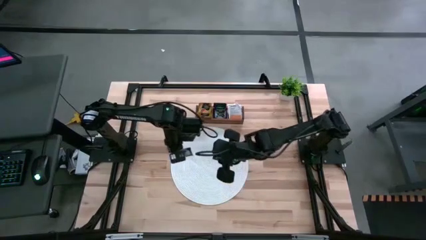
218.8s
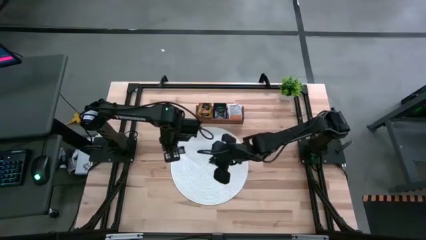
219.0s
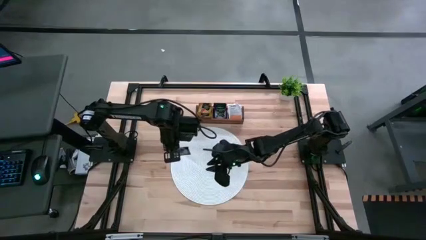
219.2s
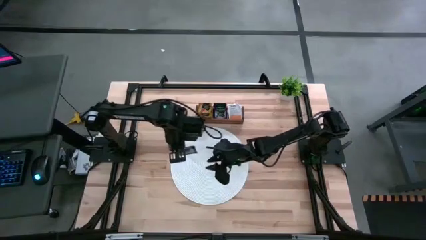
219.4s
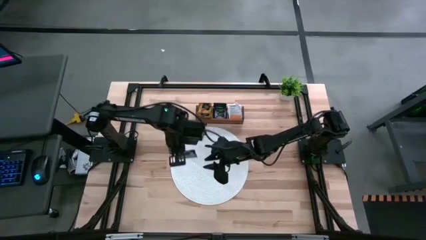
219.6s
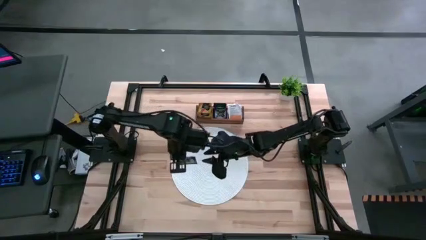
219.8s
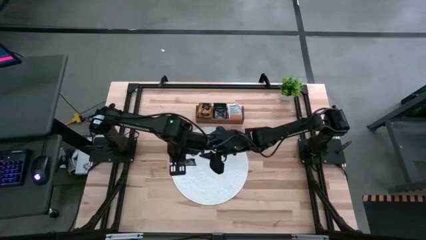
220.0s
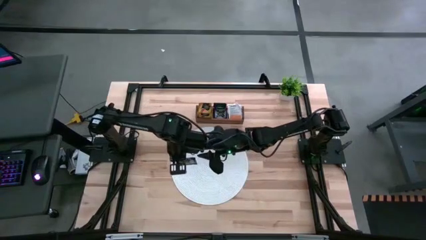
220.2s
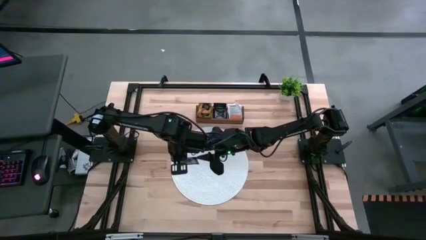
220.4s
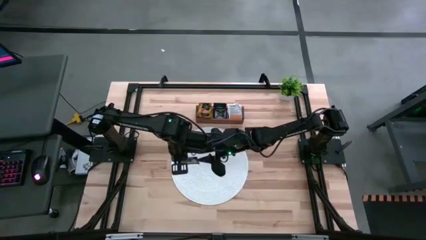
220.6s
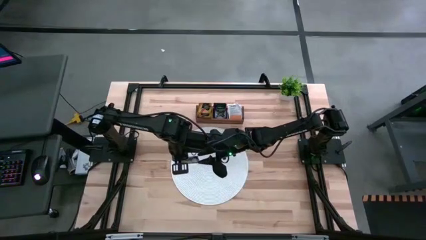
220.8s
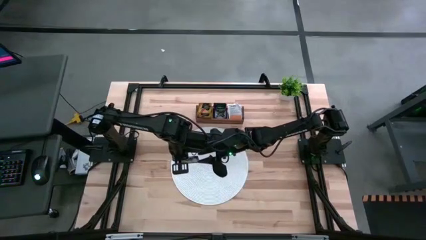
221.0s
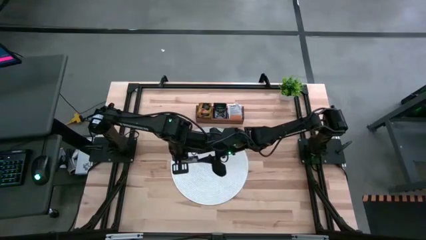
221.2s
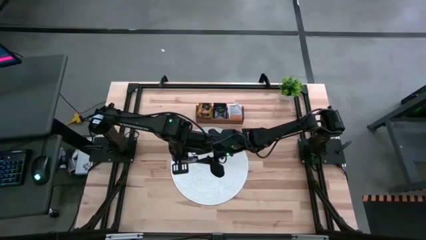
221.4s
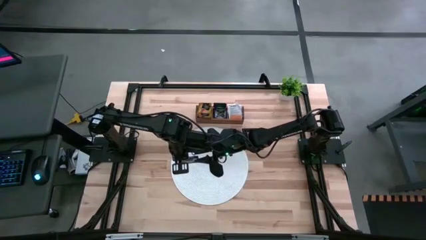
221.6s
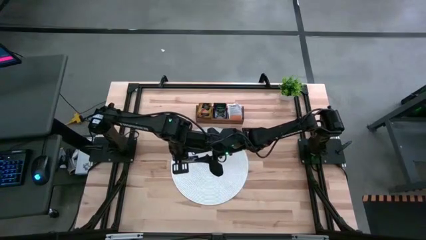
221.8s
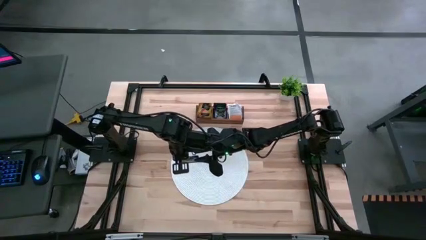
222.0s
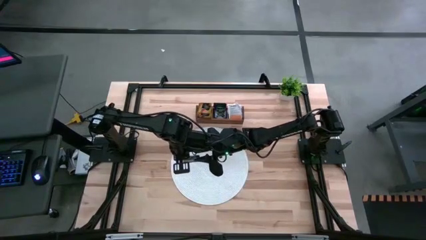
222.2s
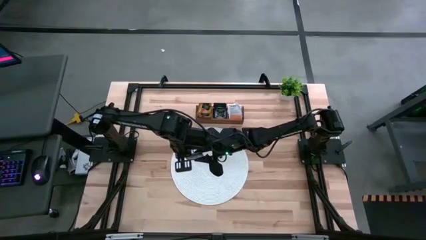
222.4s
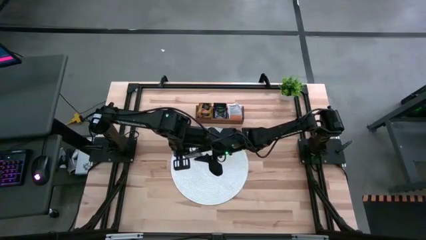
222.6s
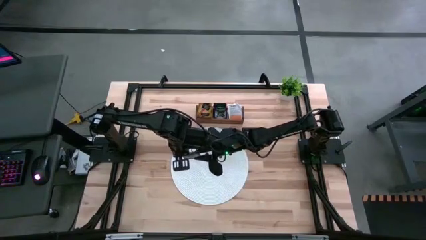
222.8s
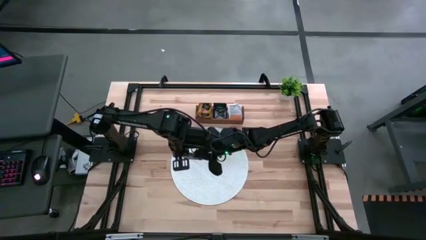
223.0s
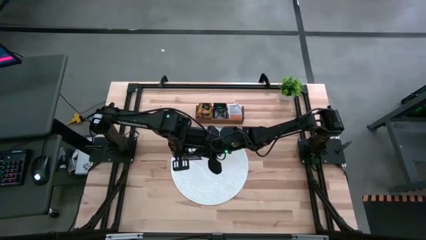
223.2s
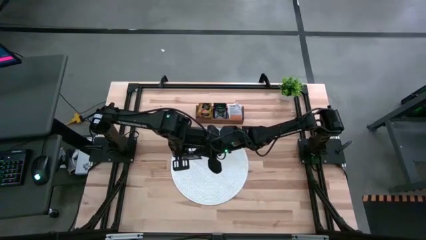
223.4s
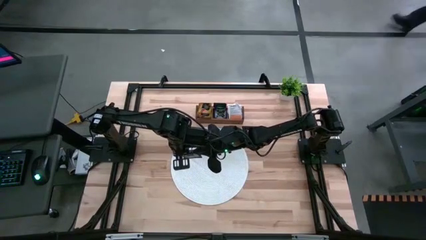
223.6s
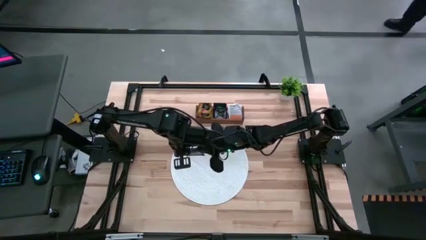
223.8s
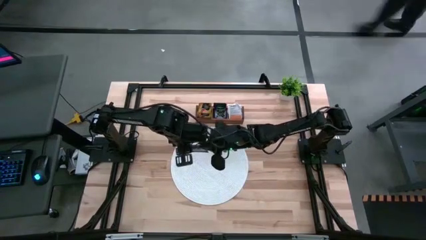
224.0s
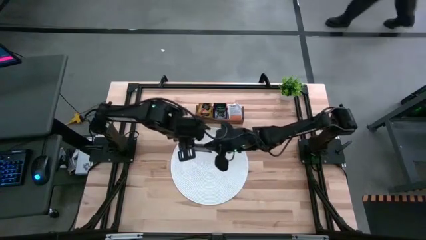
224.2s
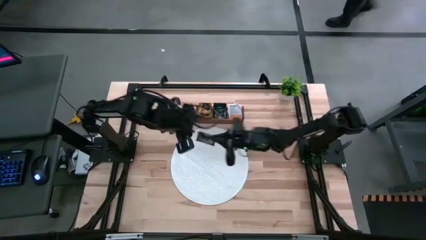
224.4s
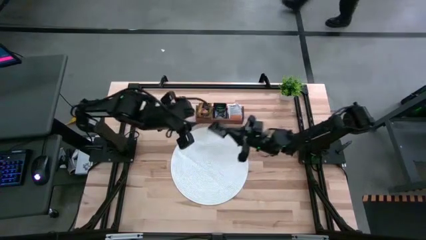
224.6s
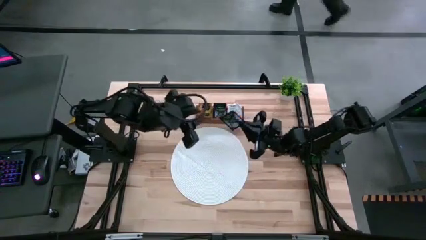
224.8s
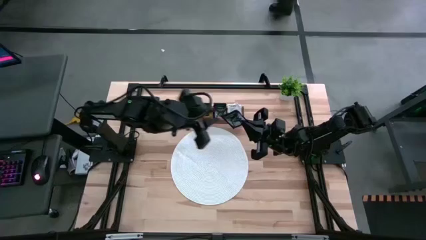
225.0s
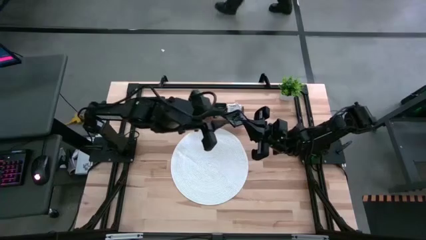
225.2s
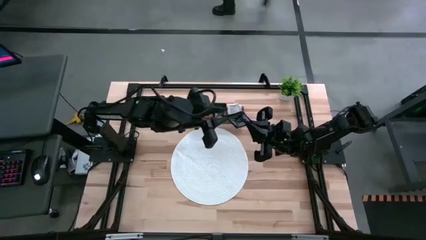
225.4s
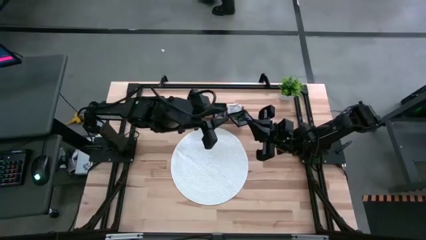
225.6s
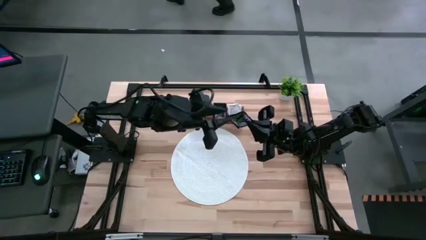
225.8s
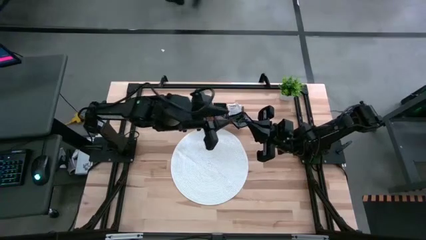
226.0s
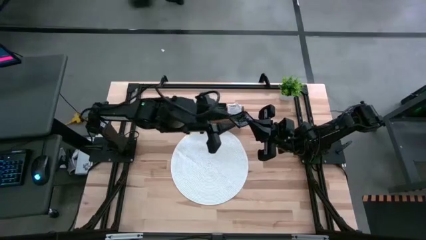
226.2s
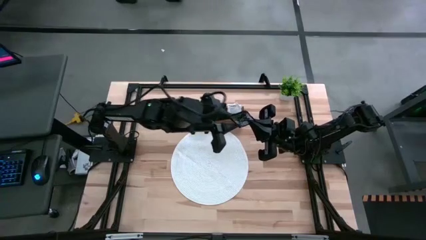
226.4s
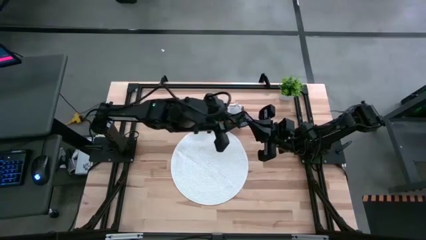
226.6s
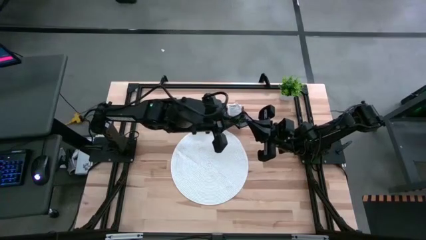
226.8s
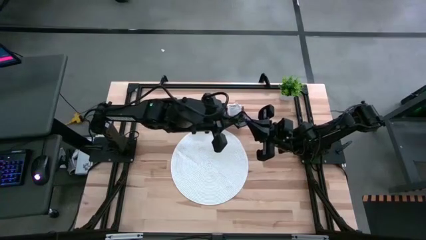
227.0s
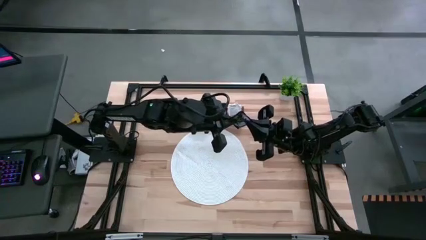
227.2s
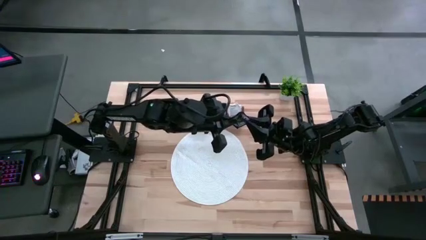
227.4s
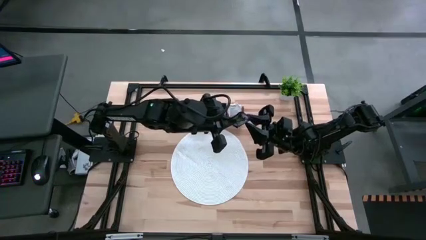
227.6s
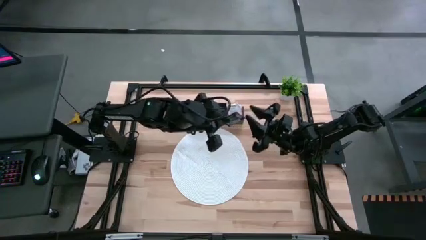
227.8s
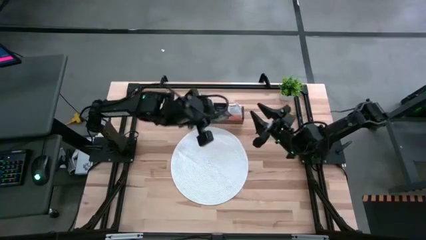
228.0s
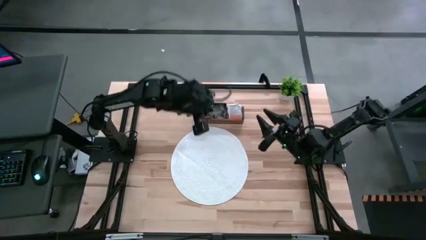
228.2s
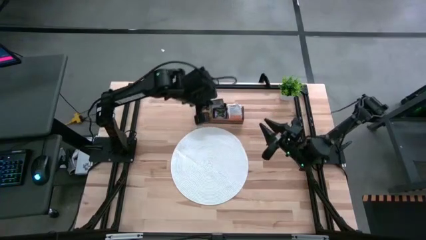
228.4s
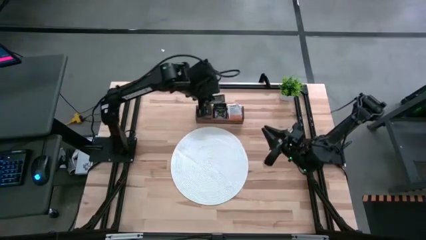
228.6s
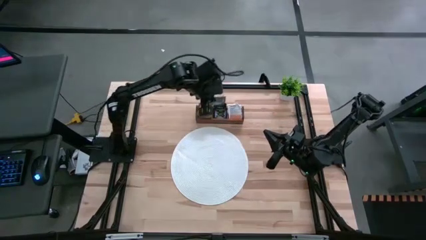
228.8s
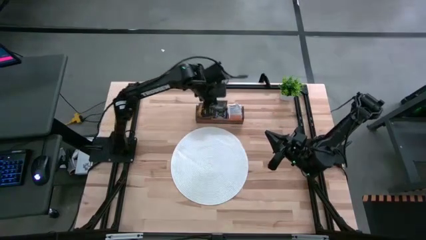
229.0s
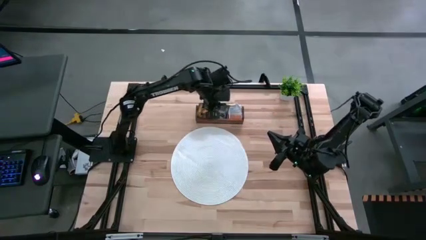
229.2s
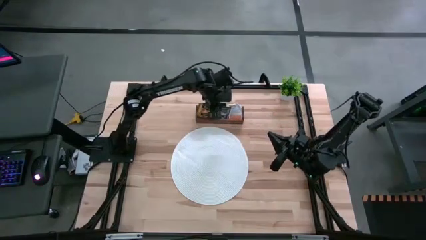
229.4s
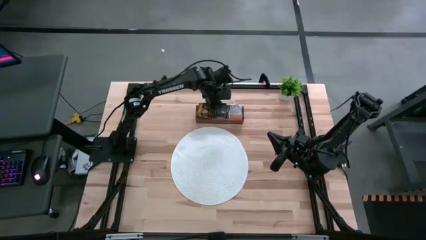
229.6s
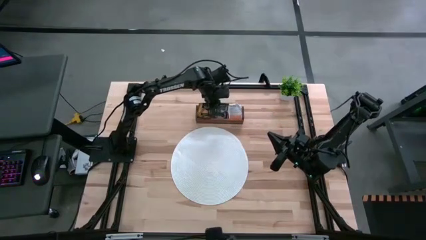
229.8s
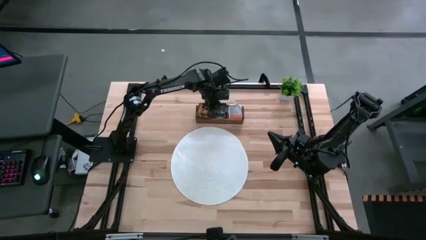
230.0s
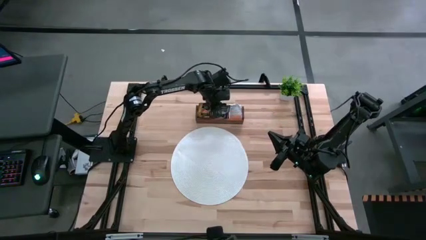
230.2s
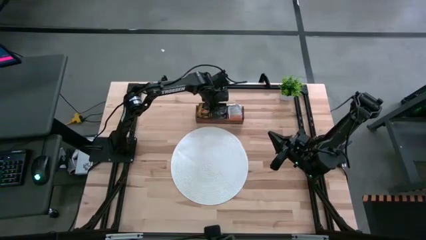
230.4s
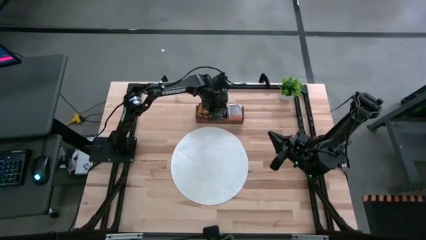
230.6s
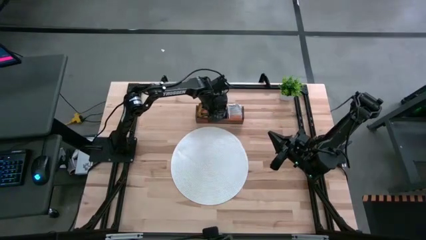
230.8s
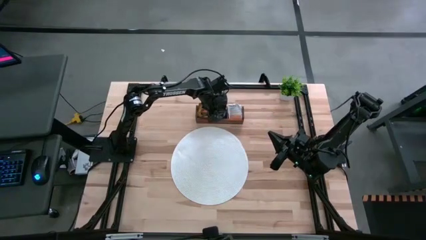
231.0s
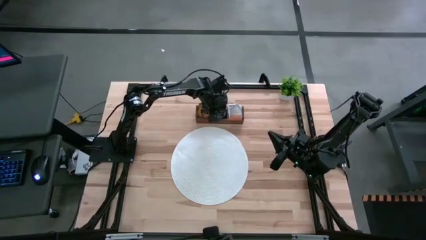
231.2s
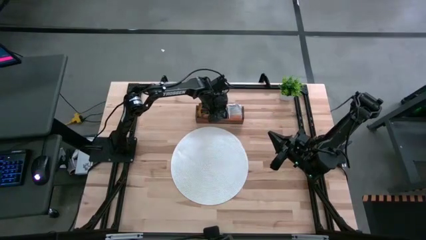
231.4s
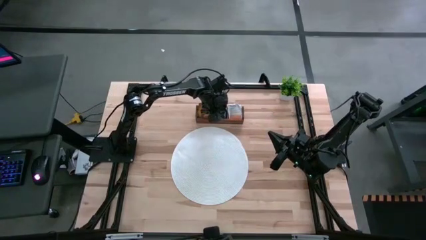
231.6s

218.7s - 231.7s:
Task: Pick & Place Tea
Put the black tea bag into the middle section of the wooden organizer
